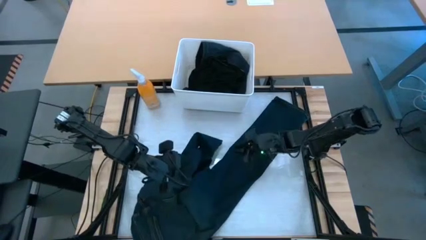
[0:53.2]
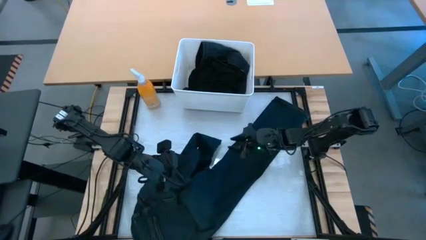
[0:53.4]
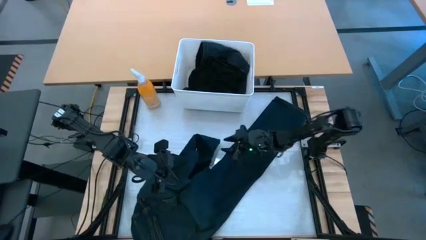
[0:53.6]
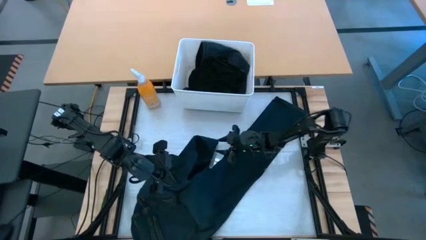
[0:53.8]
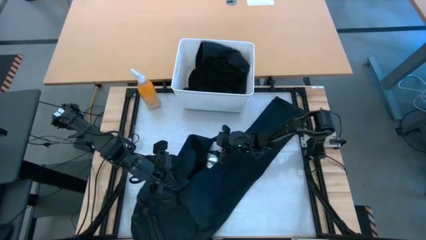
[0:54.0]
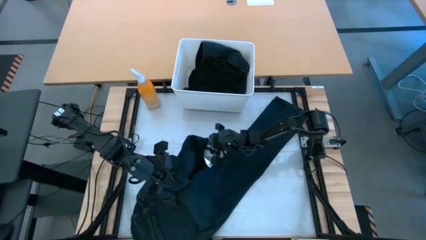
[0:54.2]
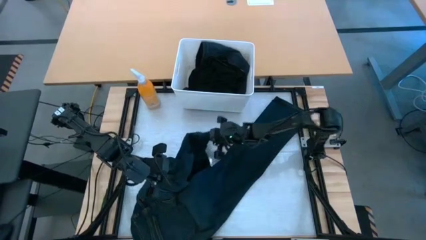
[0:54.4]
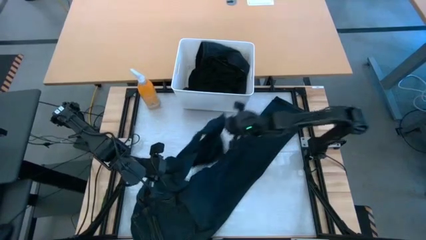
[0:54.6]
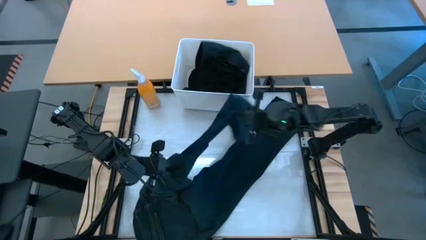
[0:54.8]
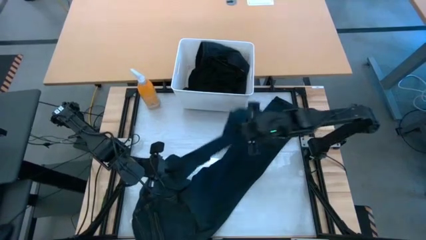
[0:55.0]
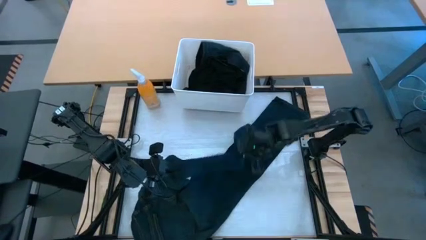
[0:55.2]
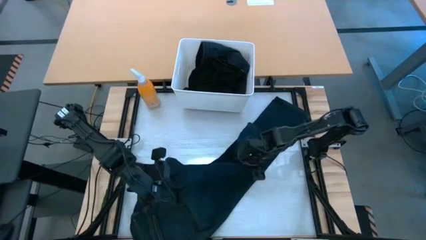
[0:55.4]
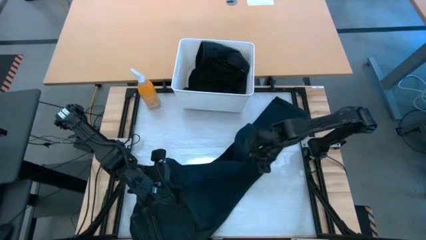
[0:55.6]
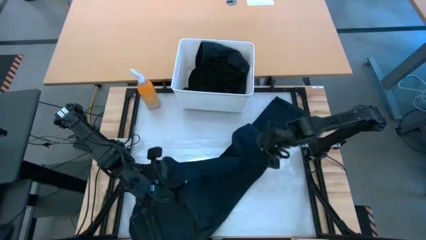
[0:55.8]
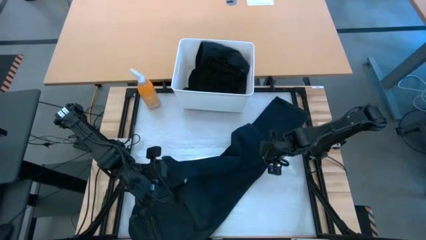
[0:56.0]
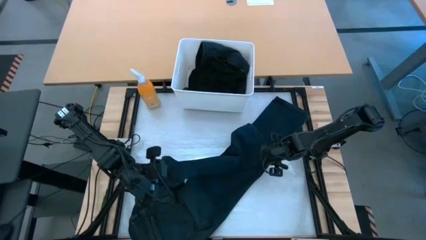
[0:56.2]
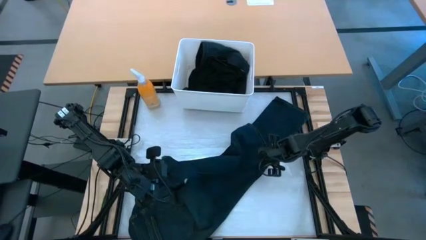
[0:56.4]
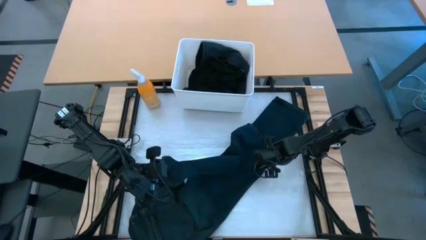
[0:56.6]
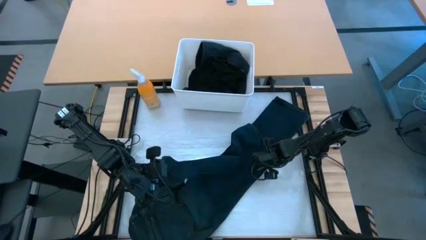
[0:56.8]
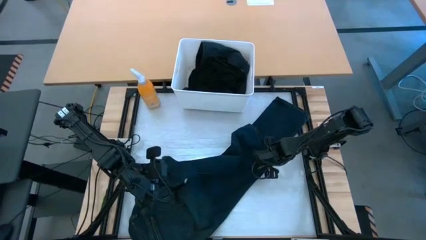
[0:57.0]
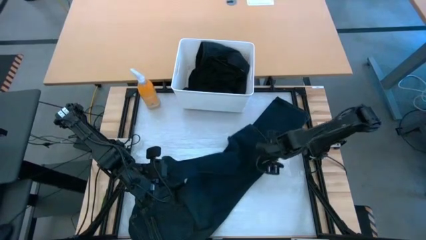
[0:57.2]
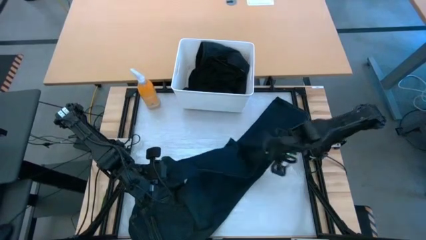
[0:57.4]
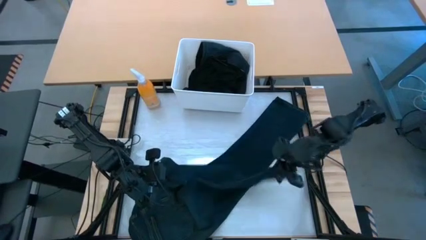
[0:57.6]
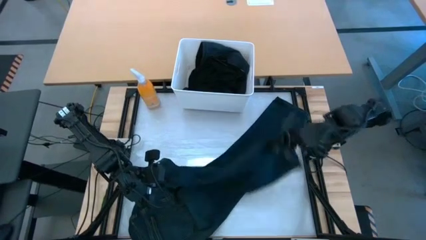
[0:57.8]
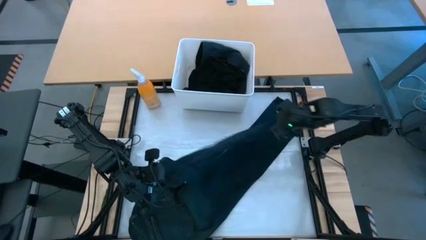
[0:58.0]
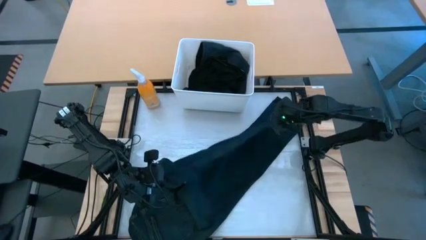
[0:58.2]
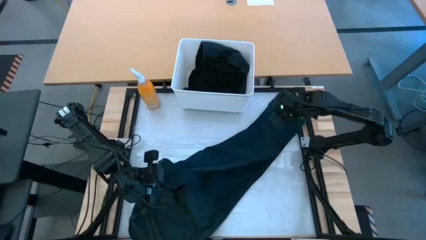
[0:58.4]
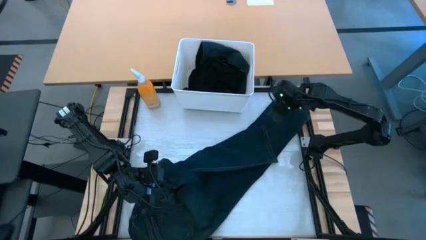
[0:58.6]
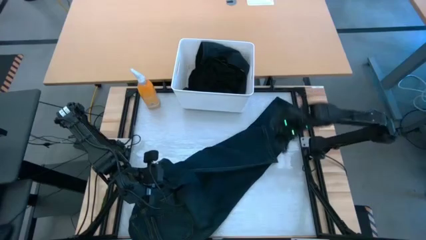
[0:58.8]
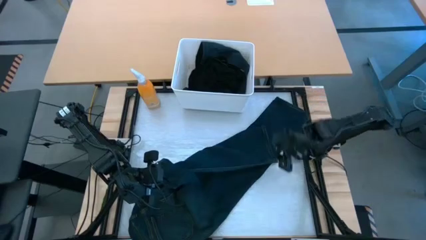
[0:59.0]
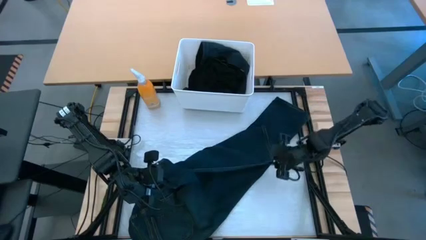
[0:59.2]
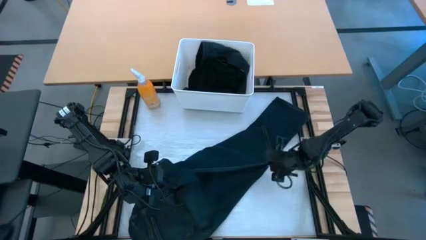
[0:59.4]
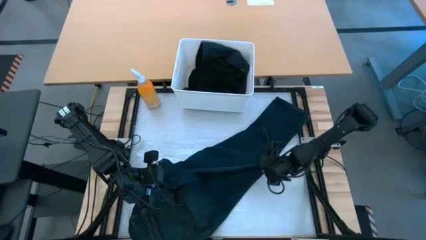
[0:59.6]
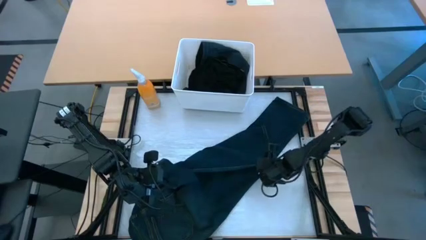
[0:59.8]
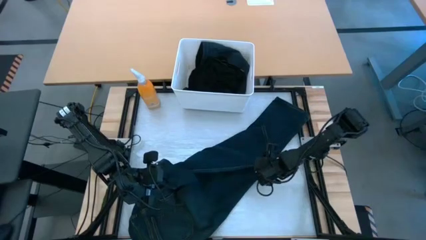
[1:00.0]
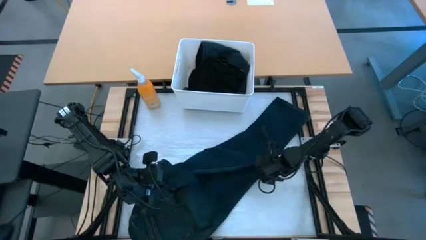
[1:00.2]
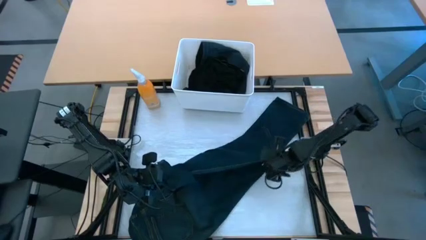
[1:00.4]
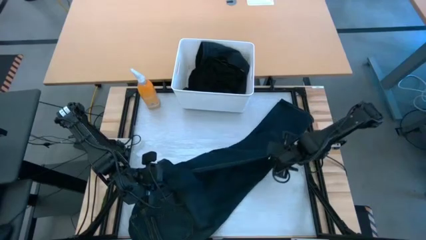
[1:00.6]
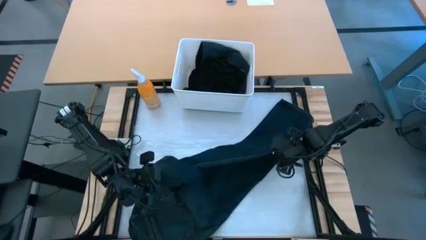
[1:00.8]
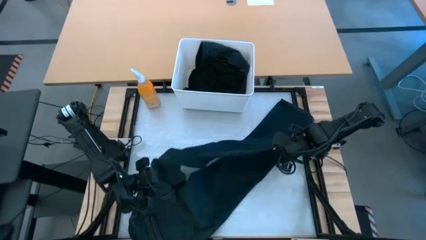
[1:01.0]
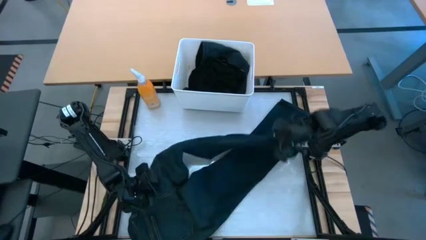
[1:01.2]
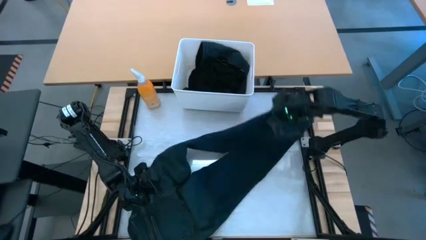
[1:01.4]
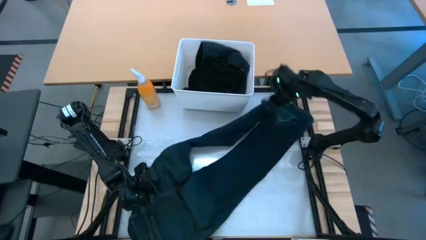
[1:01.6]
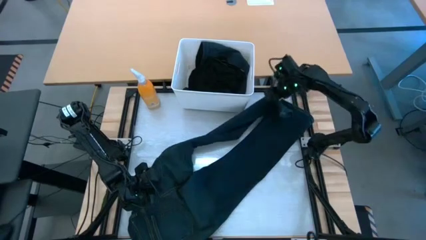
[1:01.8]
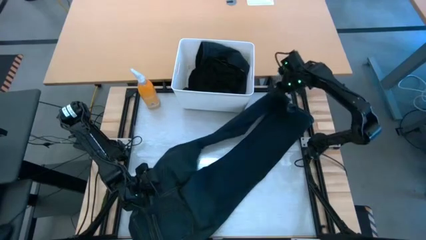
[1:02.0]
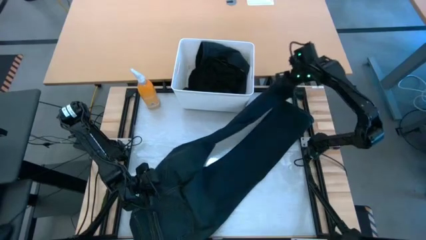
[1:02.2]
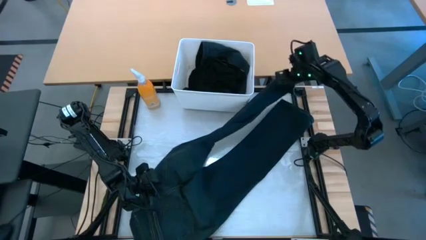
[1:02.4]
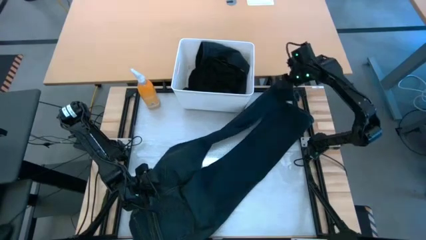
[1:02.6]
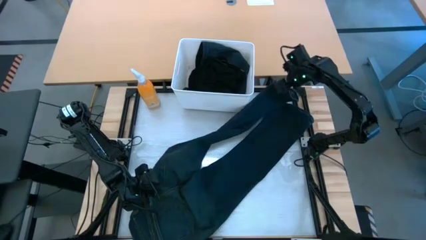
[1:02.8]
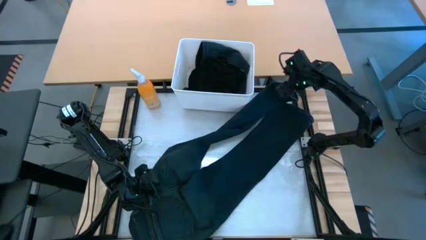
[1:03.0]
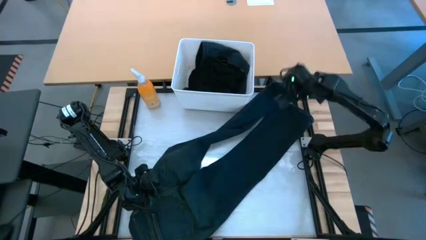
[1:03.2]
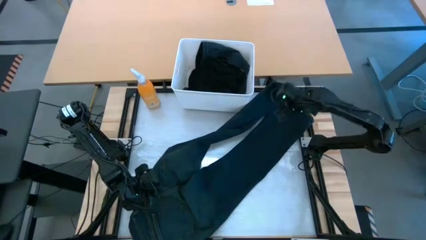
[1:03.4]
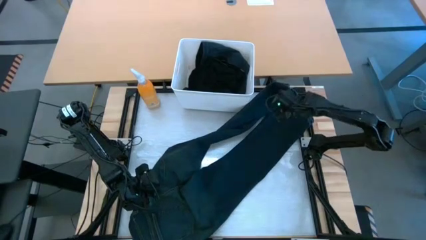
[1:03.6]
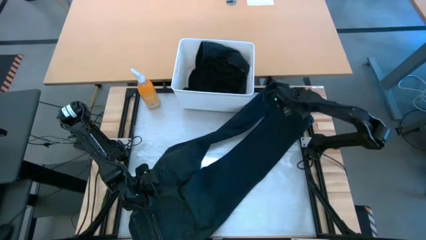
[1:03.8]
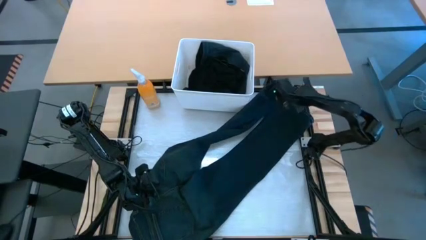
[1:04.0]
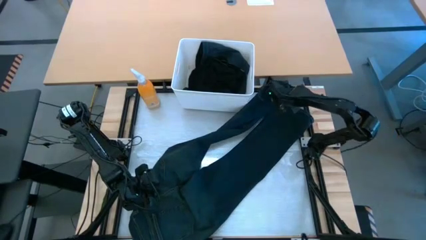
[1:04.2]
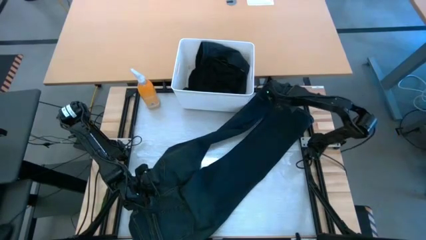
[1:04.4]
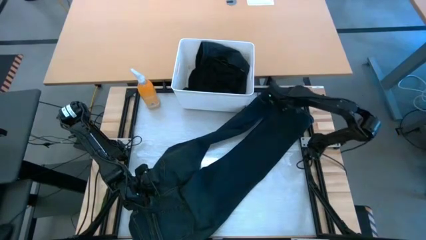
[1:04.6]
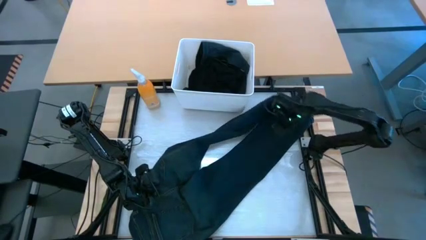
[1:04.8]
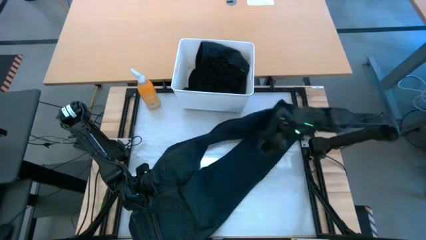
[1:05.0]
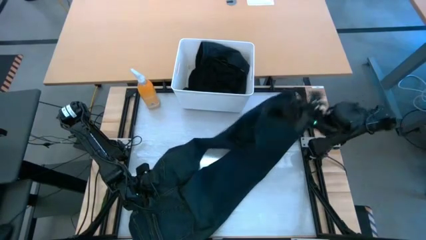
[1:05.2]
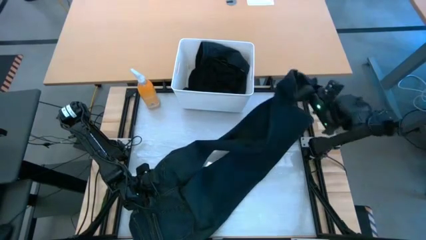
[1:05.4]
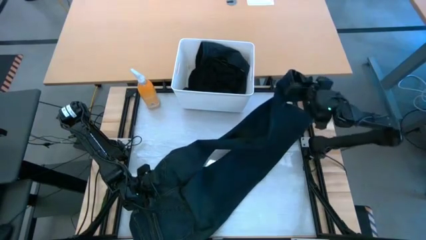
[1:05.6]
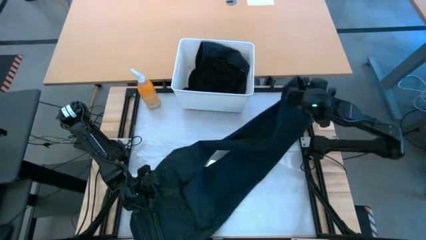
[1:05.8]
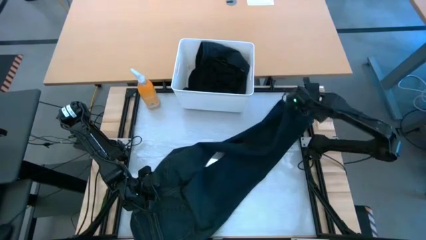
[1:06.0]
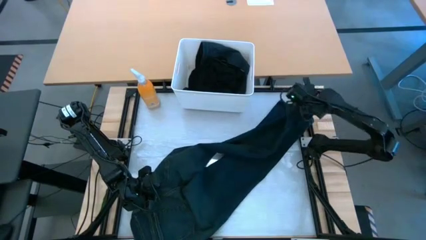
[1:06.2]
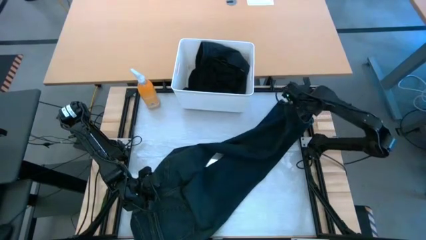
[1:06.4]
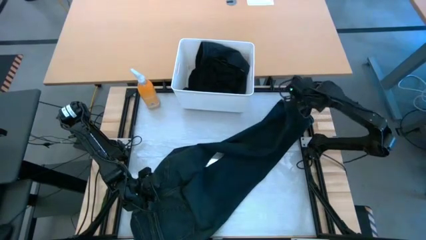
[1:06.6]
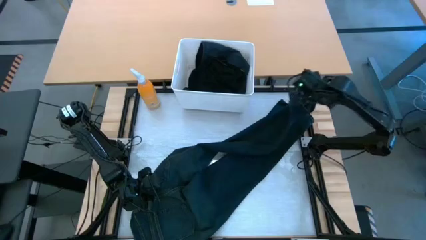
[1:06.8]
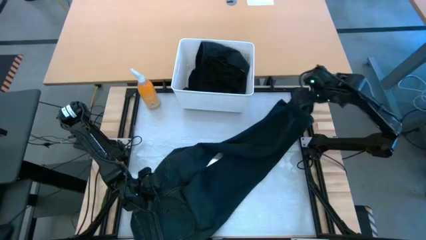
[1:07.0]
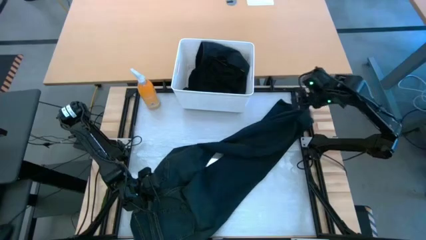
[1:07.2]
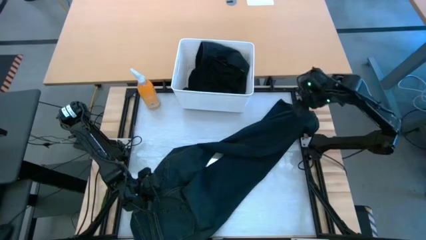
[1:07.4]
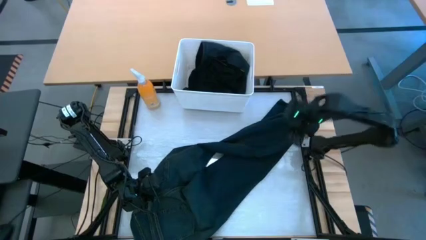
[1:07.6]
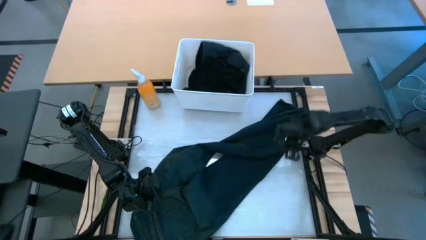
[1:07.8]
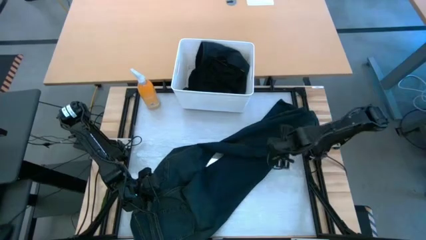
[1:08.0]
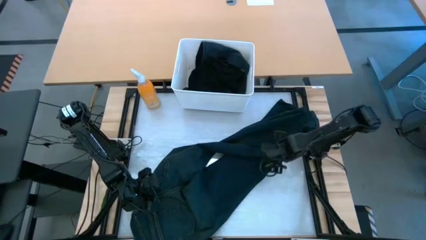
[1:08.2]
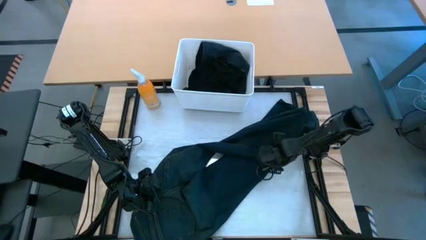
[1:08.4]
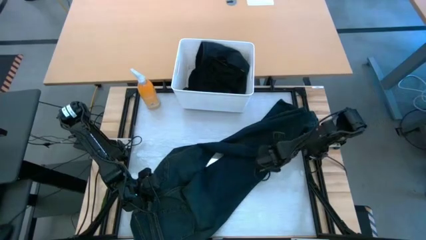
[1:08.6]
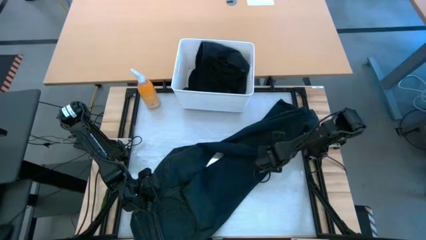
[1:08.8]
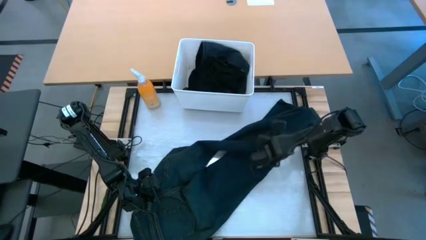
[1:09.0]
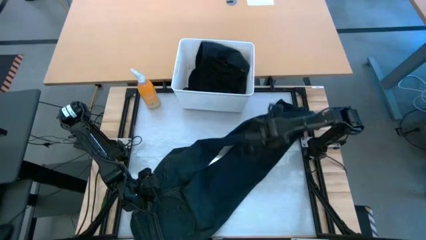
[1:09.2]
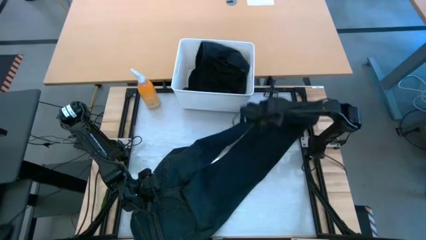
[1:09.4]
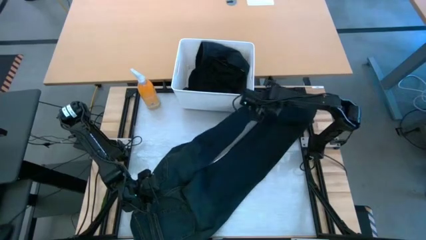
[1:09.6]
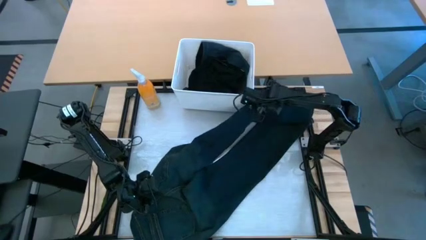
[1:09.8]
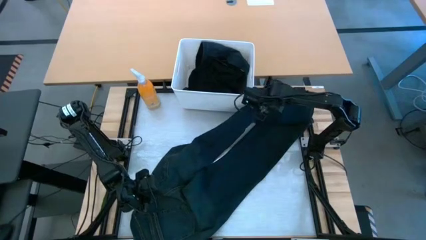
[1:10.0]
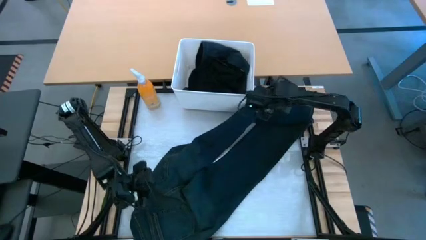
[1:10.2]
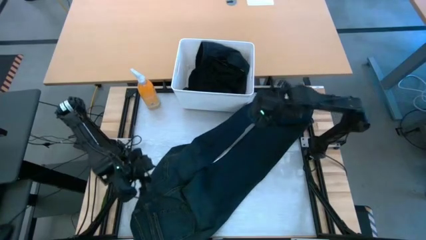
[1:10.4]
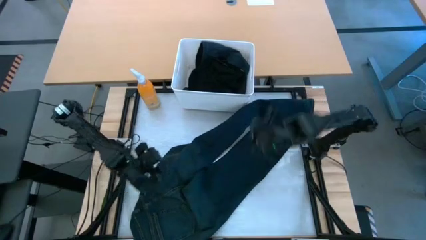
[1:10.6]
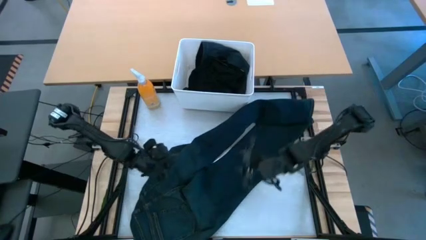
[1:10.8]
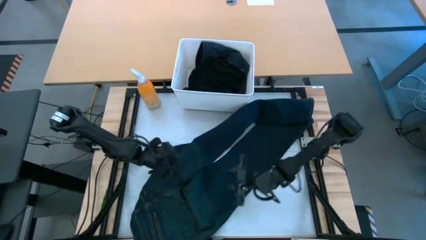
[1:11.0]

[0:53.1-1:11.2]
Task: Fold laundry
Fold the blue long pants
